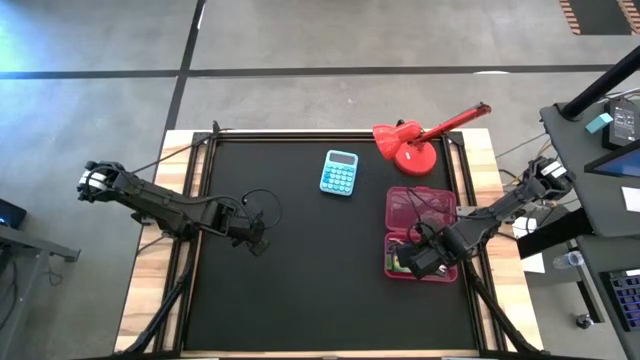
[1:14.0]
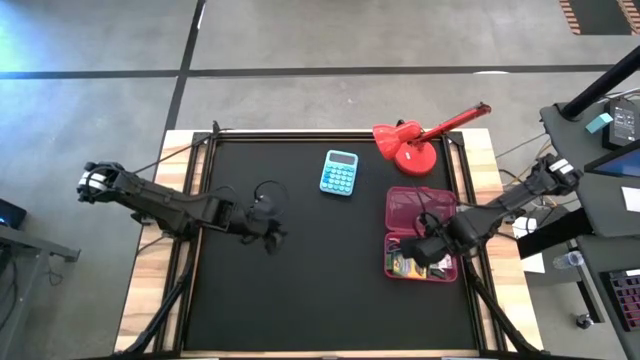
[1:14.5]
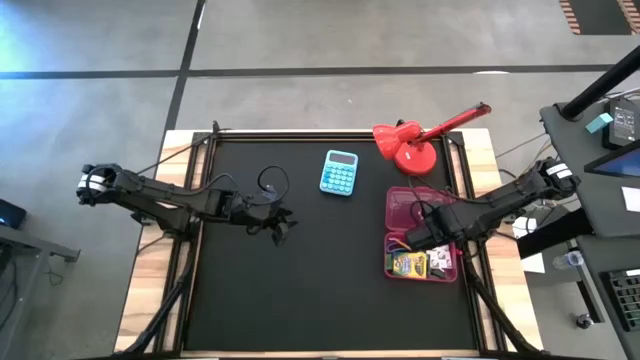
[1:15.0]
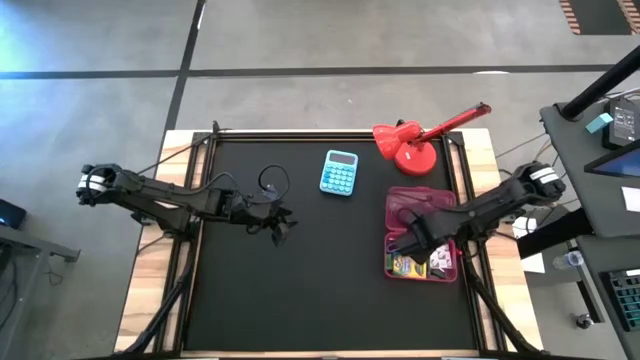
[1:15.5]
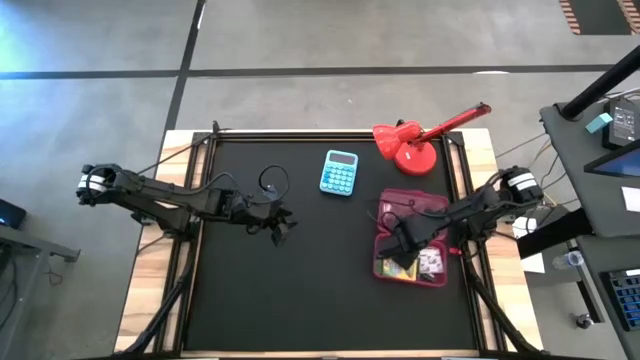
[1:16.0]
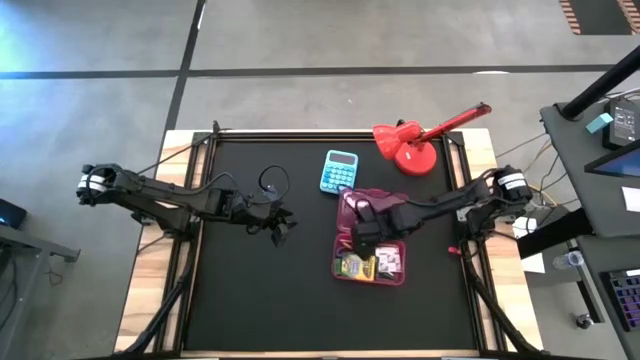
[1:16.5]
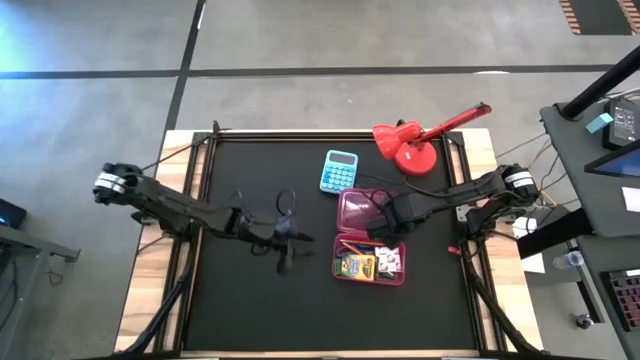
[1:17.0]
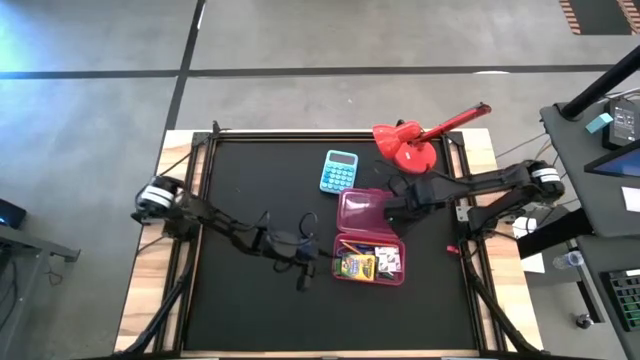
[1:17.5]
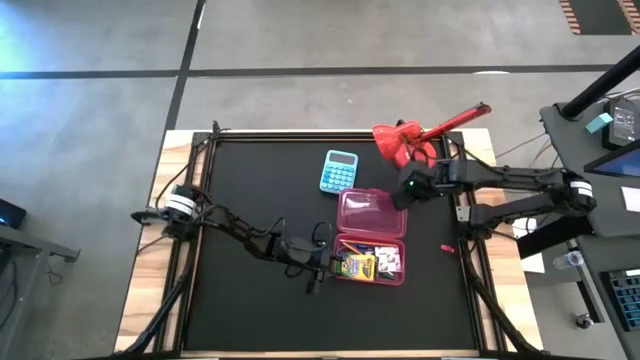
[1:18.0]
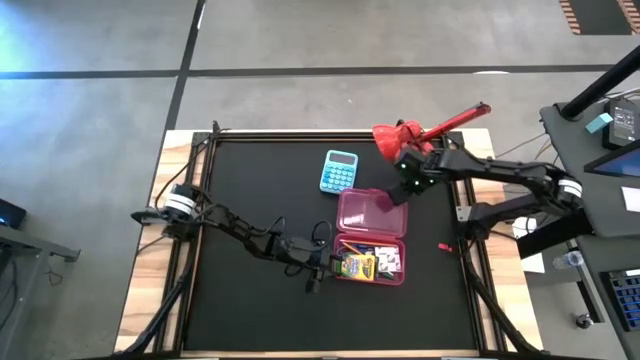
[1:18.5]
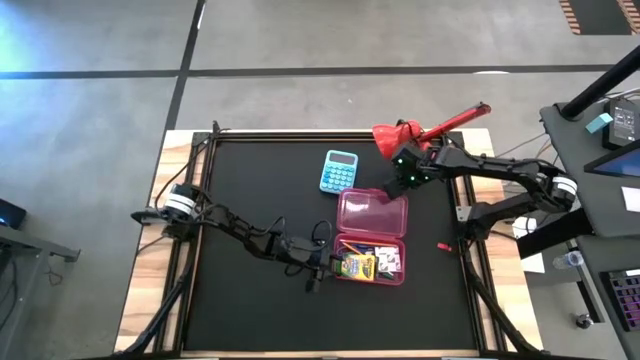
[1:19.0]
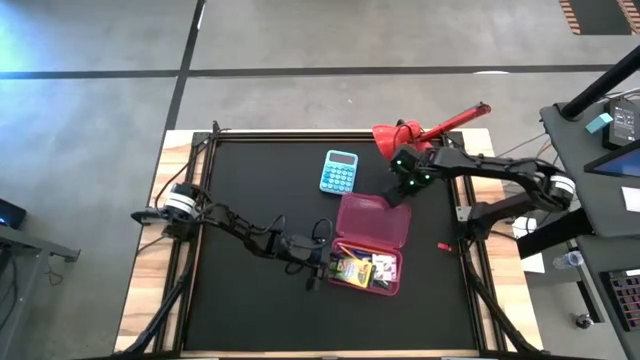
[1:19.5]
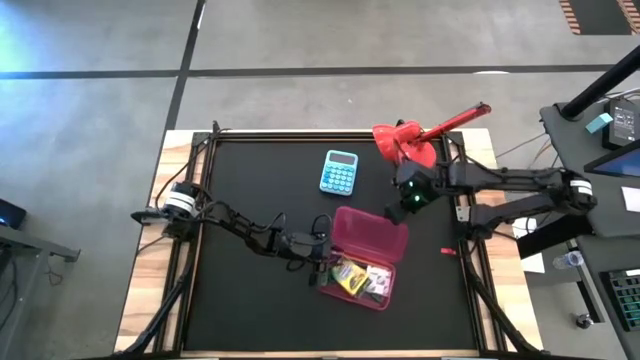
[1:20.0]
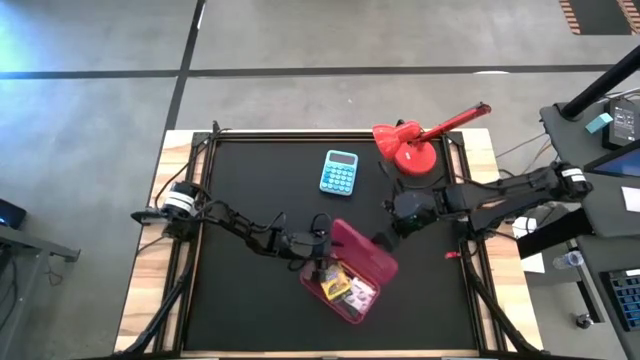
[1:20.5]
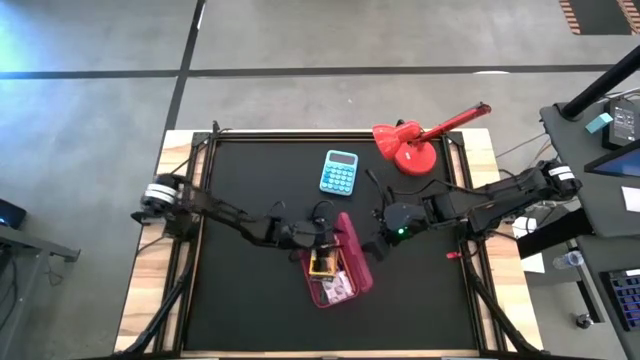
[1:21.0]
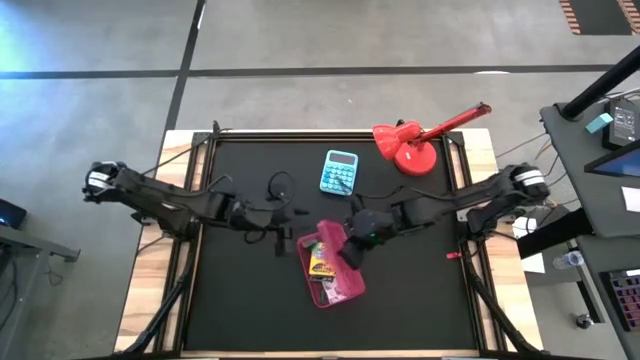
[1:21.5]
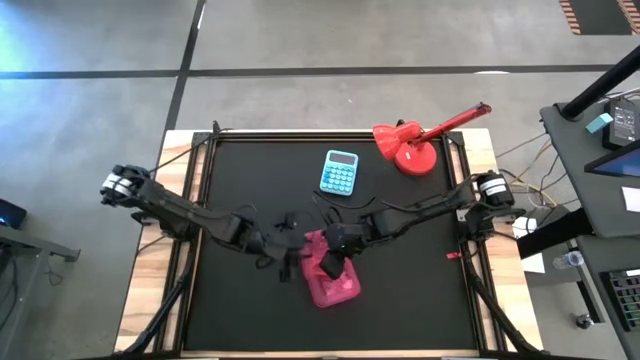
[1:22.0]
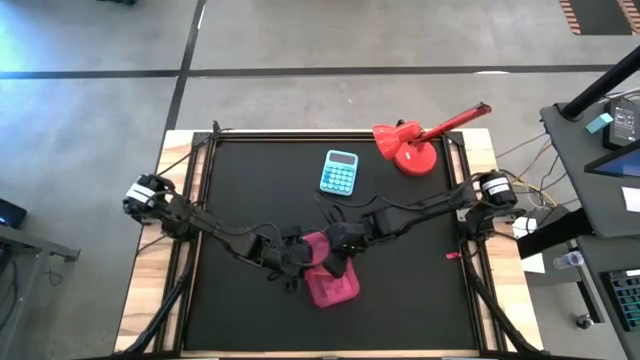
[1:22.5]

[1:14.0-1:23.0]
Task: Pack school essentials
Close the pink supply box

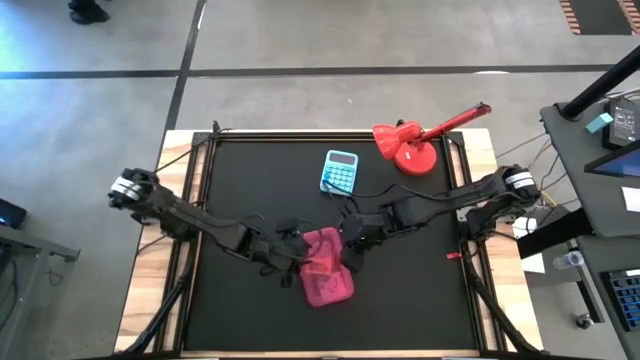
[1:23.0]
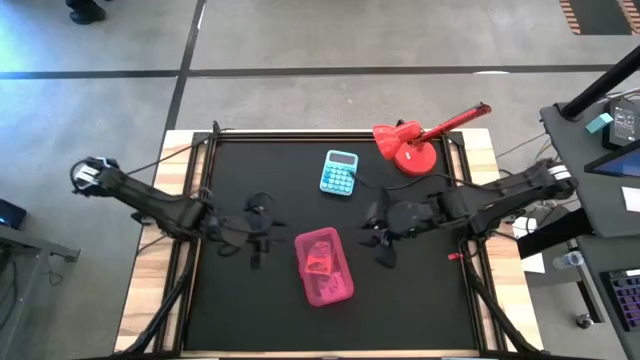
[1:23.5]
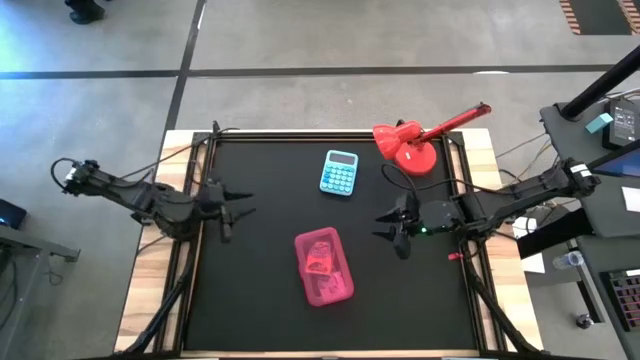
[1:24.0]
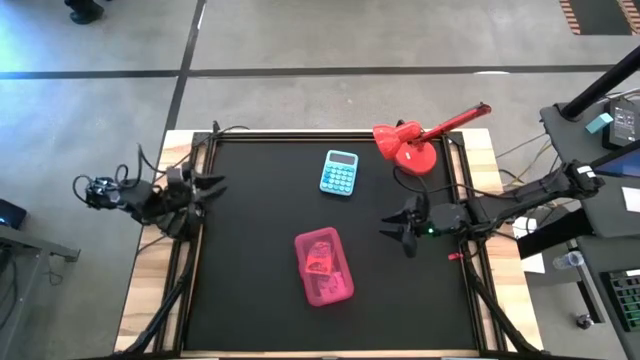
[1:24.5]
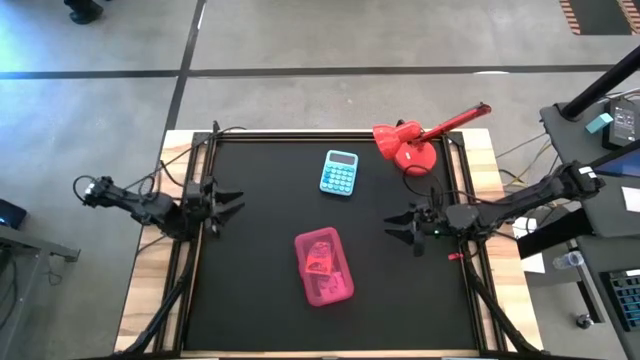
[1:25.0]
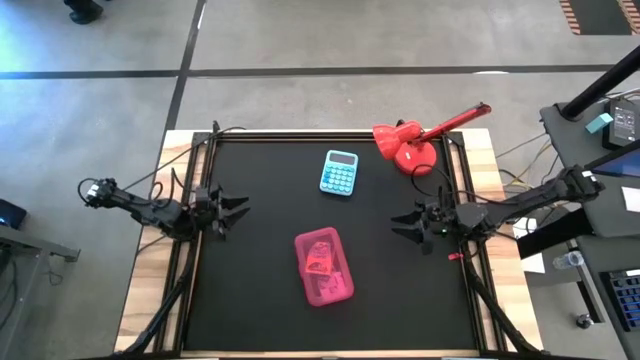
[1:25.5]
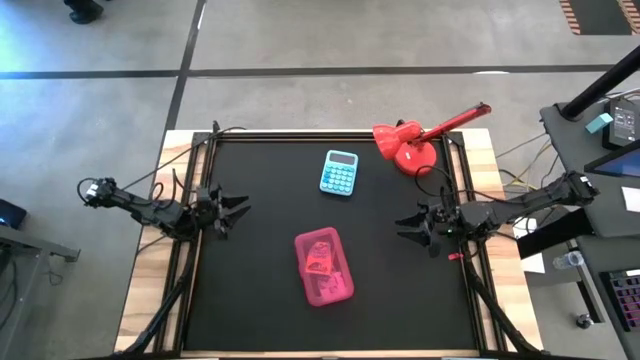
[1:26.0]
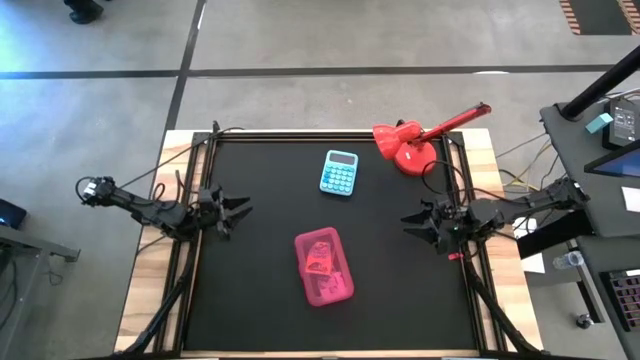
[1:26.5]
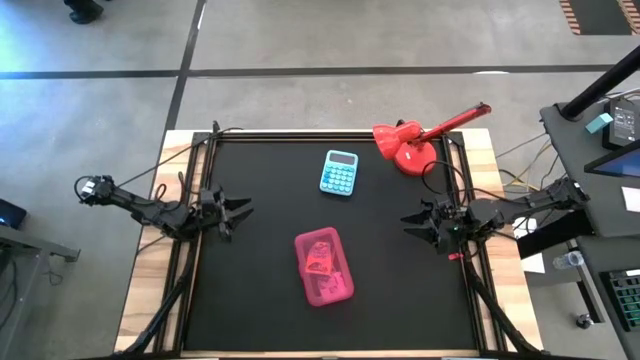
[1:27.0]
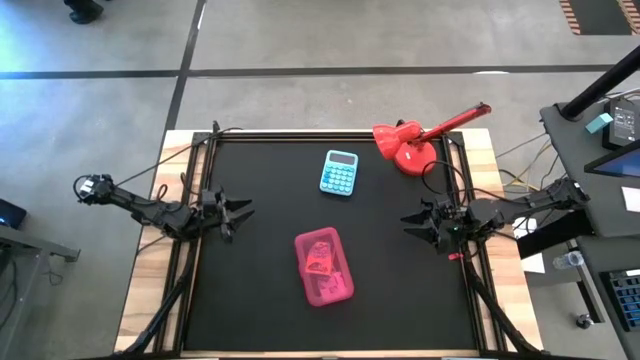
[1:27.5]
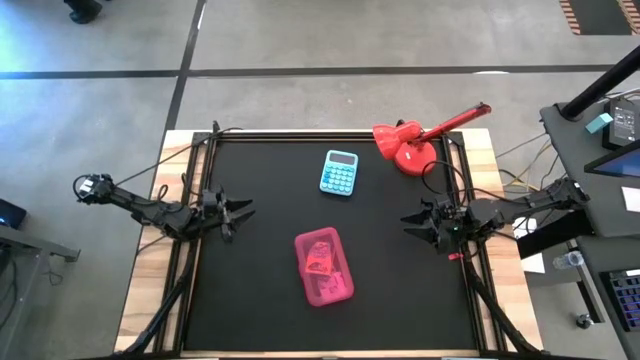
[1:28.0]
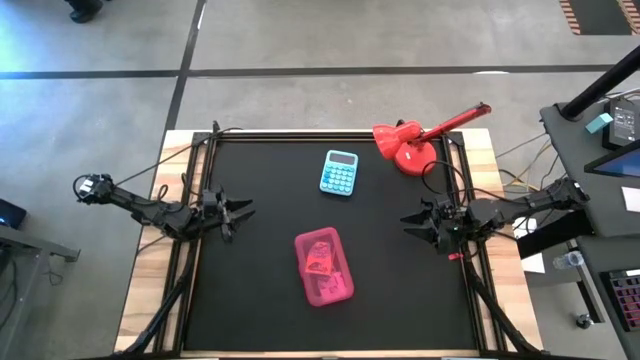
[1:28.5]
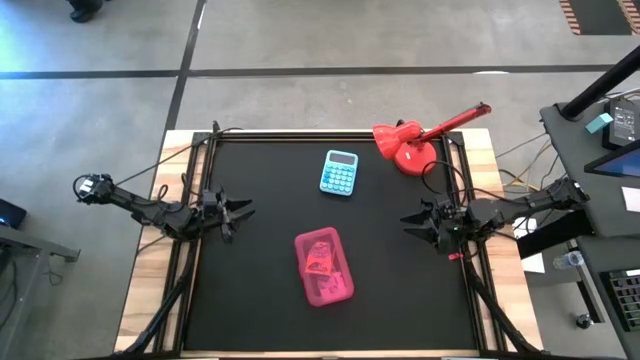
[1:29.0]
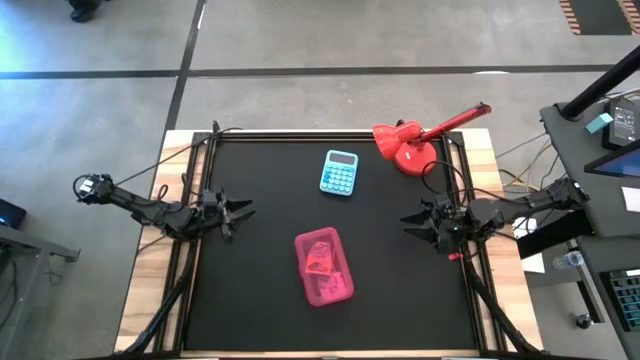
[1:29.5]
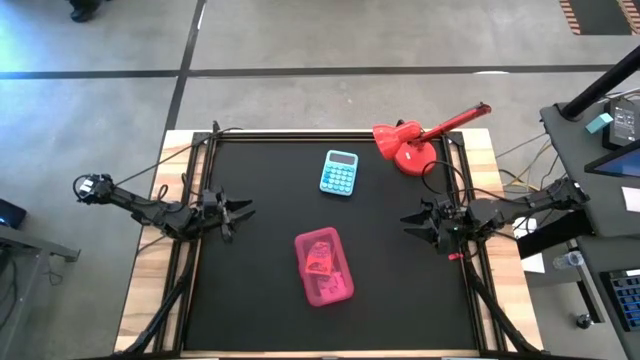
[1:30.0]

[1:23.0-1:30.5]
Return to Home Position

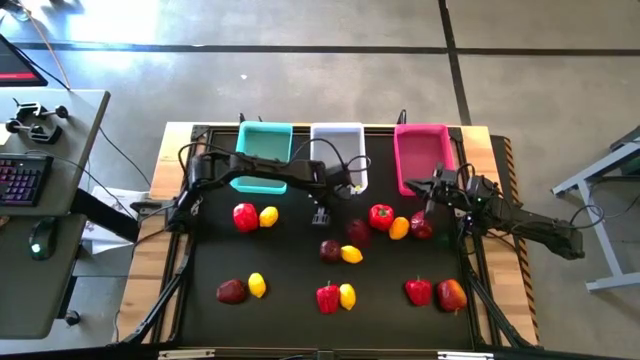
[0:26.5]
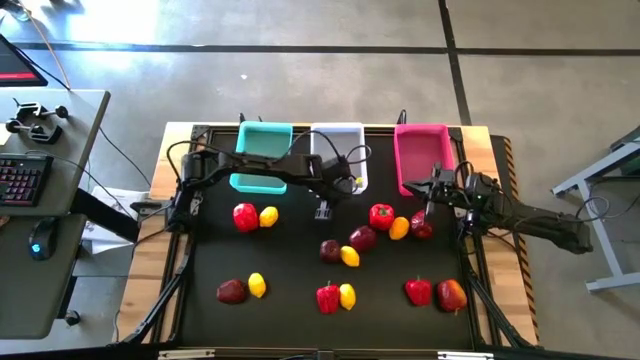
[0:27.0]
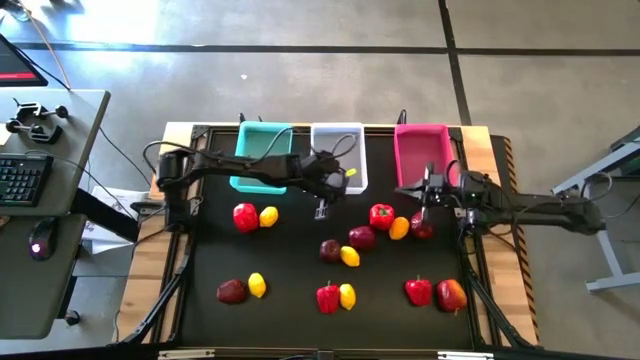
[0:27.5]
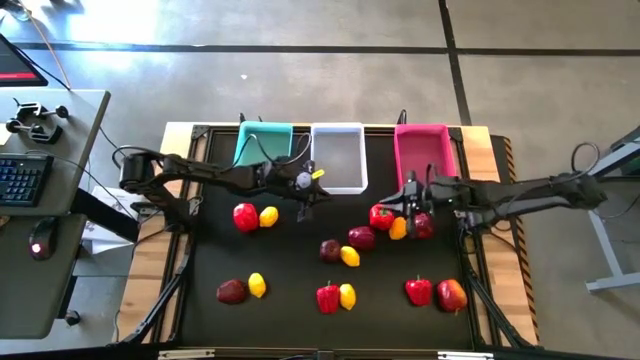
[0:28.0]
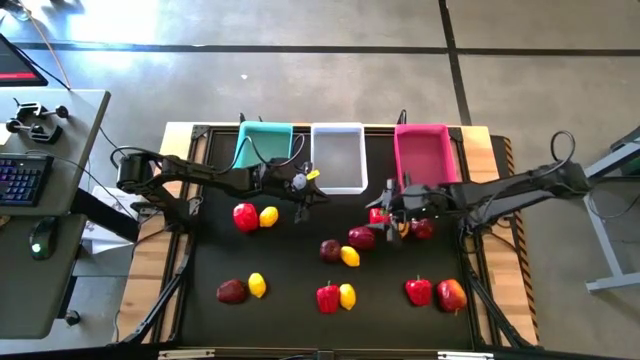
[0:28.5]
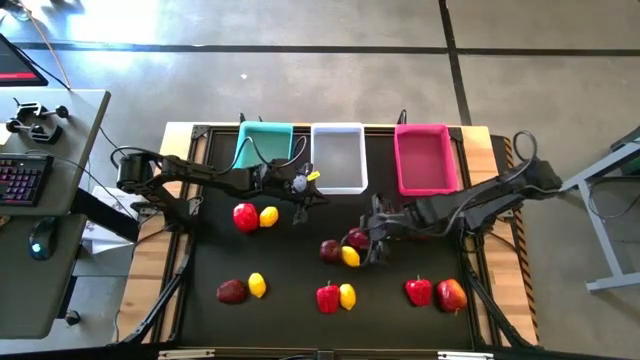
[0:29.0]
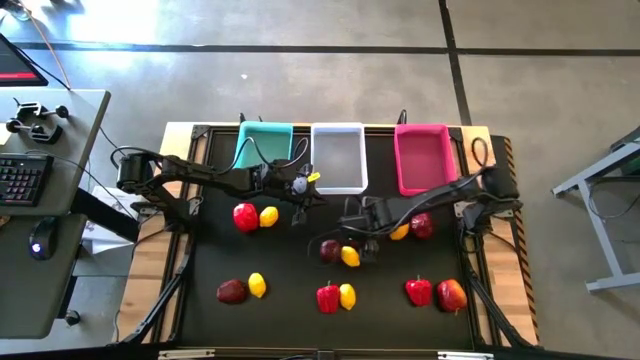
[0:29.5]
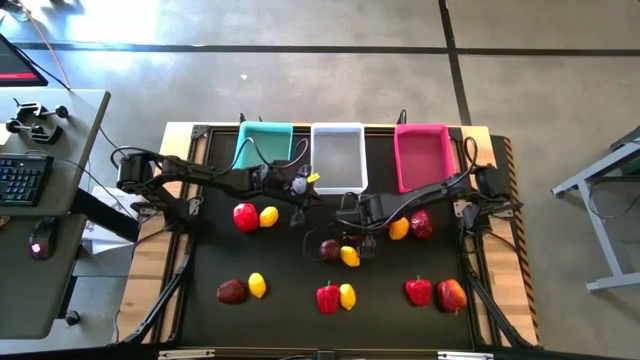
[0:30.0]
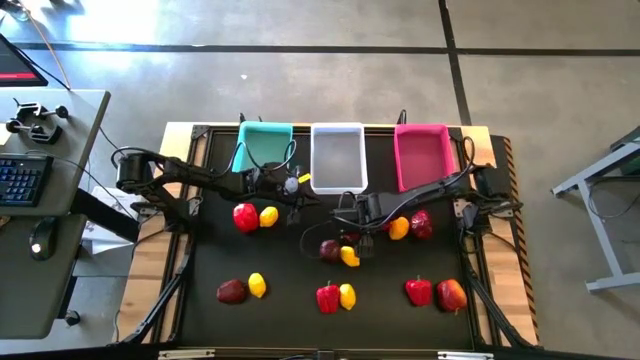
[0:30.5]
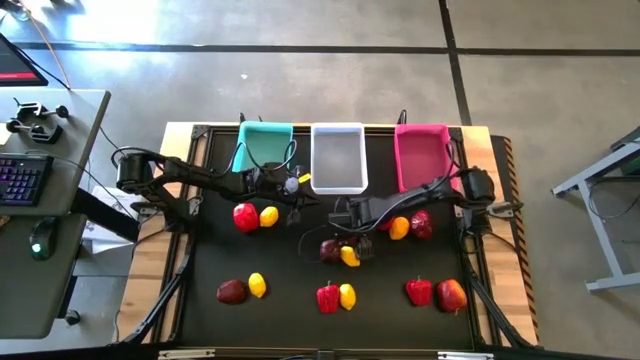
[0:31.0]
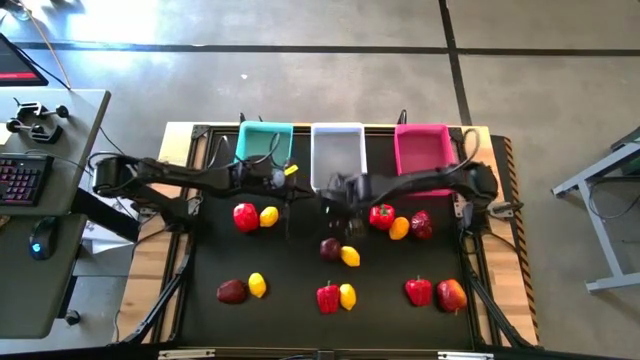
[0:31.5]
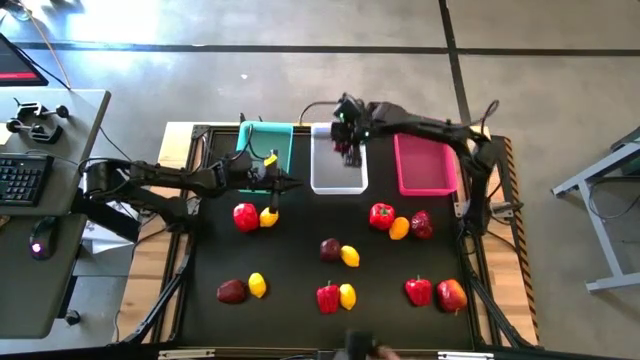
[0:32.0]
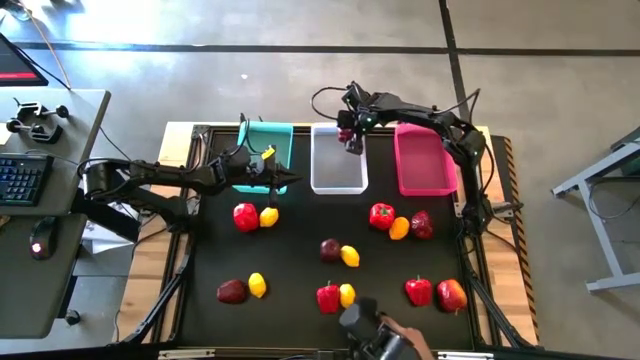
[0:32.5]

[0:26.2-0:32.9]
Task: Sort produce into baskets
Put the apple into the white bin
